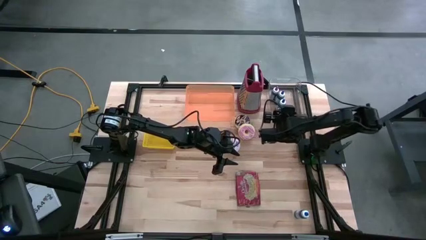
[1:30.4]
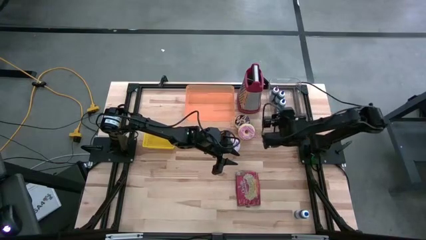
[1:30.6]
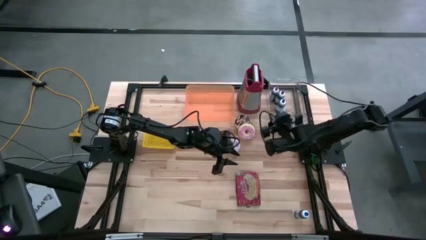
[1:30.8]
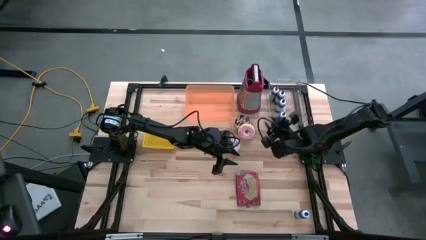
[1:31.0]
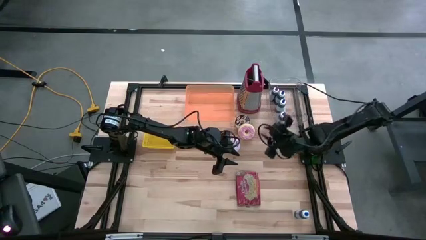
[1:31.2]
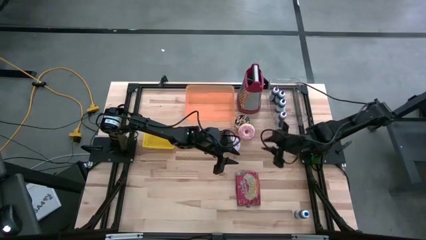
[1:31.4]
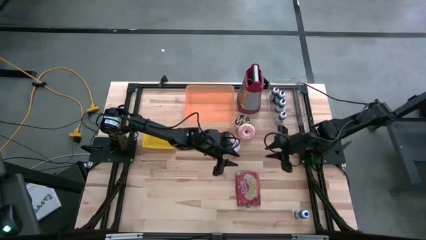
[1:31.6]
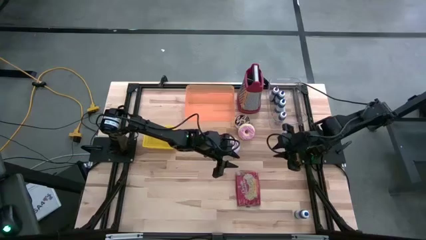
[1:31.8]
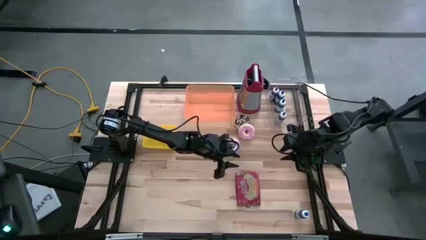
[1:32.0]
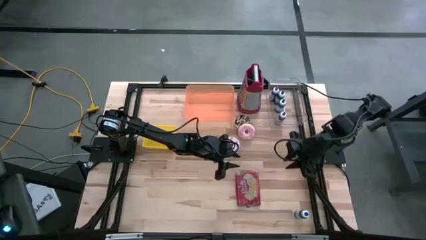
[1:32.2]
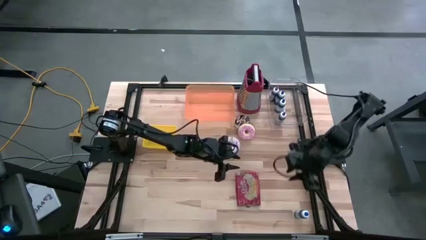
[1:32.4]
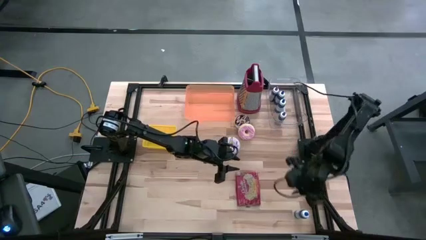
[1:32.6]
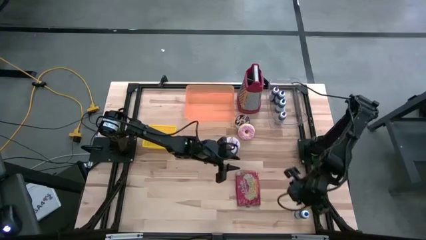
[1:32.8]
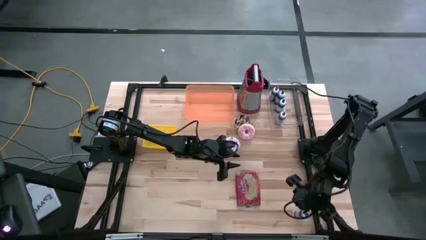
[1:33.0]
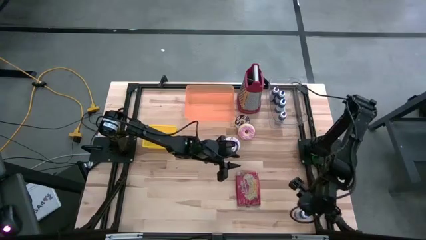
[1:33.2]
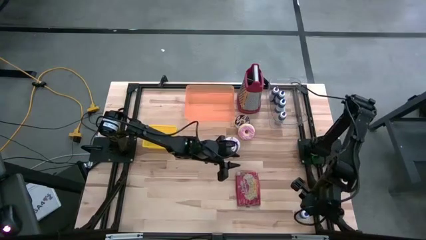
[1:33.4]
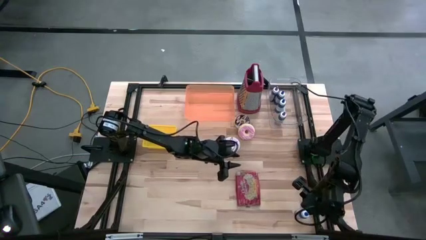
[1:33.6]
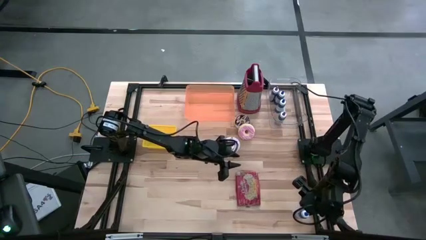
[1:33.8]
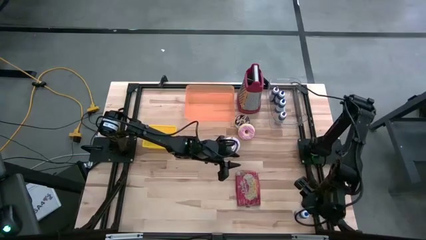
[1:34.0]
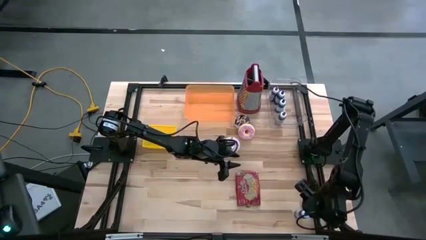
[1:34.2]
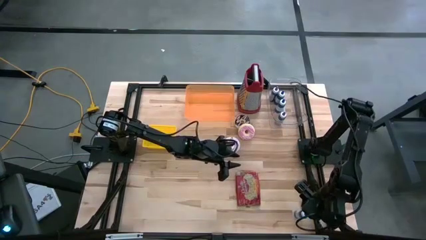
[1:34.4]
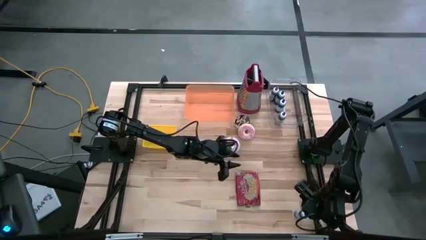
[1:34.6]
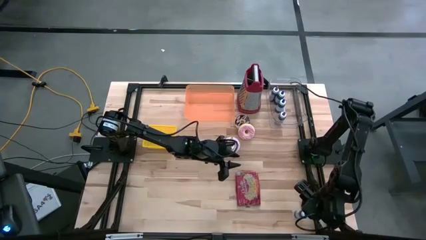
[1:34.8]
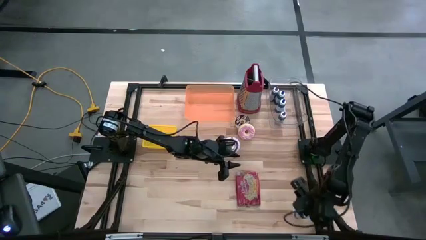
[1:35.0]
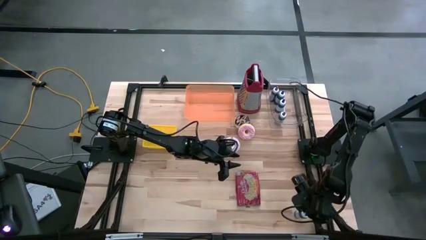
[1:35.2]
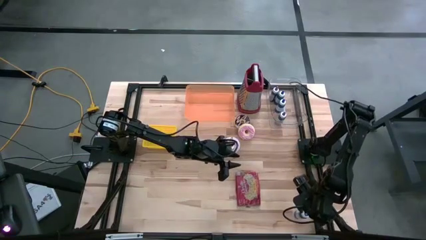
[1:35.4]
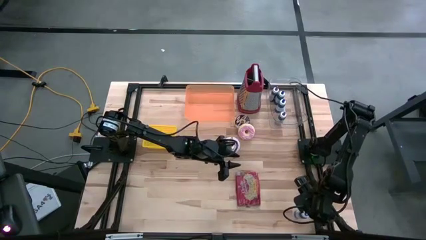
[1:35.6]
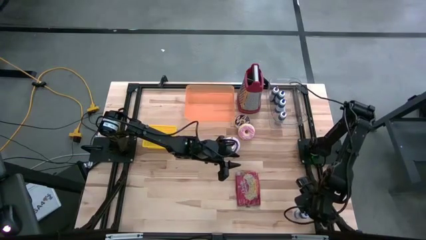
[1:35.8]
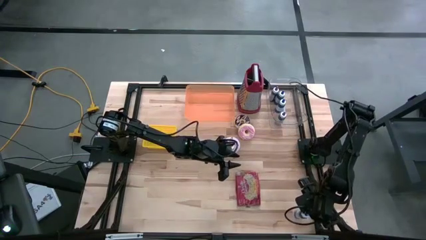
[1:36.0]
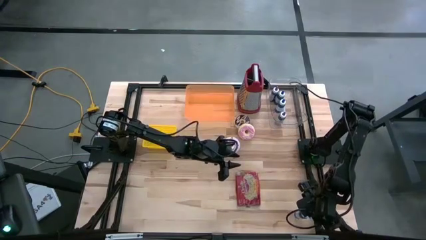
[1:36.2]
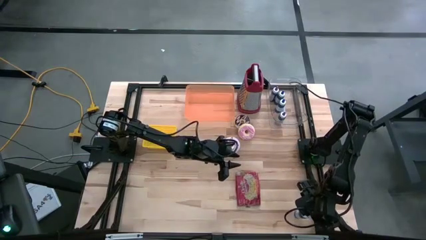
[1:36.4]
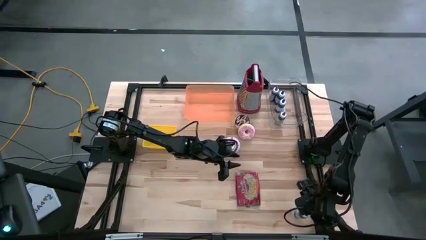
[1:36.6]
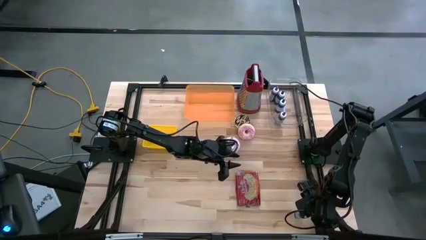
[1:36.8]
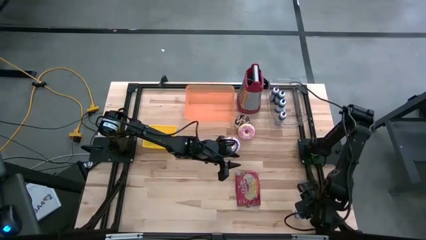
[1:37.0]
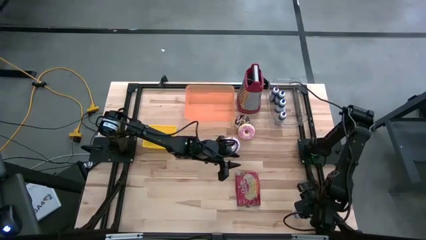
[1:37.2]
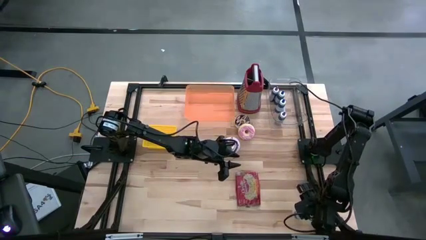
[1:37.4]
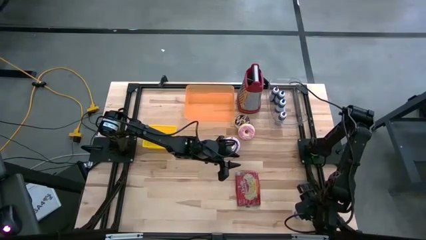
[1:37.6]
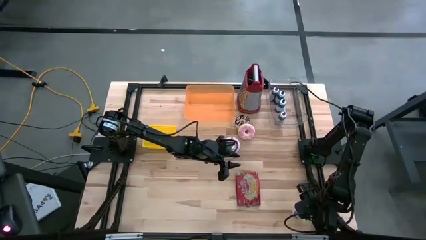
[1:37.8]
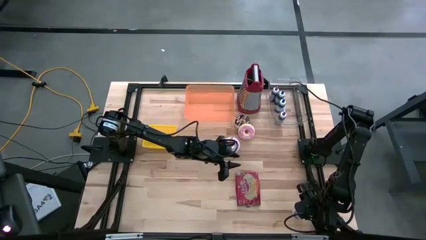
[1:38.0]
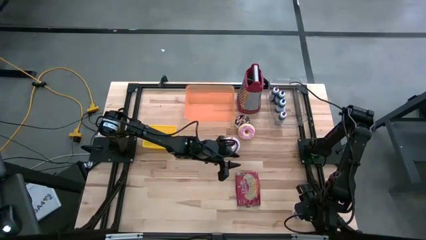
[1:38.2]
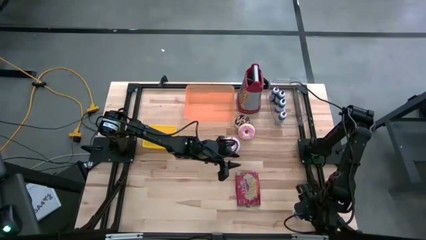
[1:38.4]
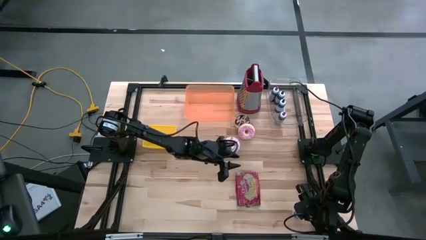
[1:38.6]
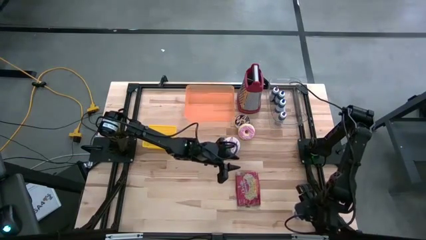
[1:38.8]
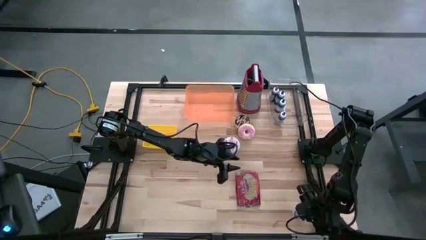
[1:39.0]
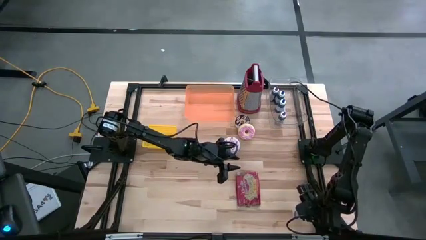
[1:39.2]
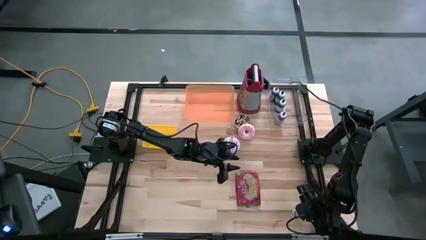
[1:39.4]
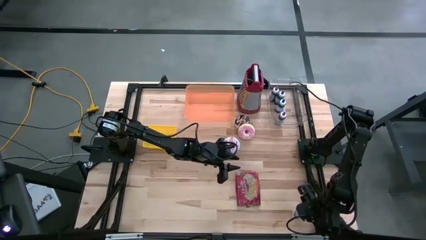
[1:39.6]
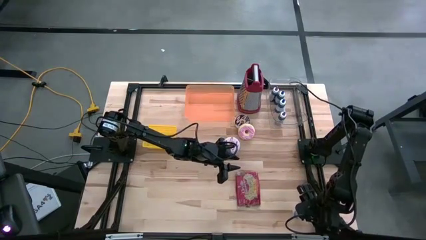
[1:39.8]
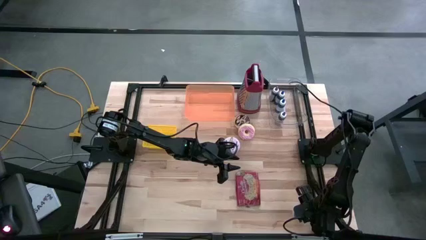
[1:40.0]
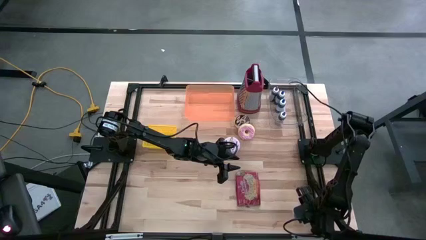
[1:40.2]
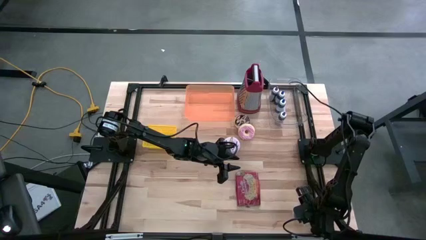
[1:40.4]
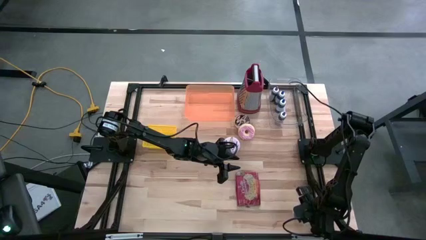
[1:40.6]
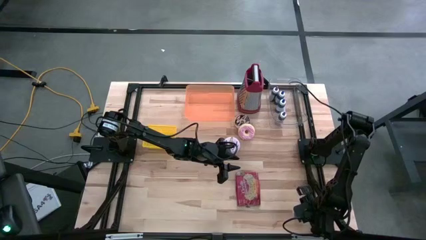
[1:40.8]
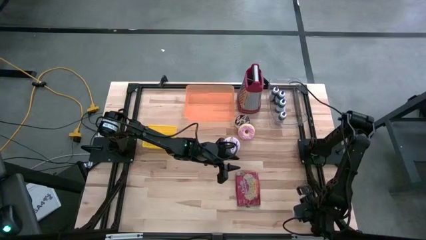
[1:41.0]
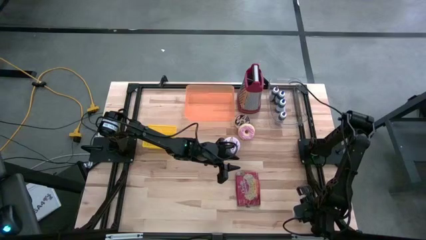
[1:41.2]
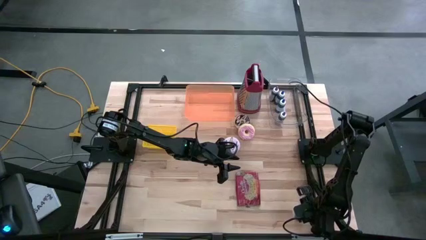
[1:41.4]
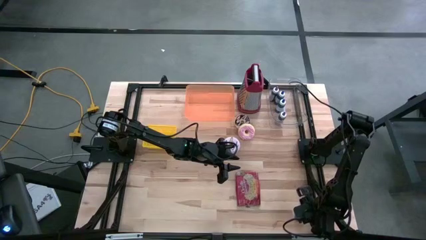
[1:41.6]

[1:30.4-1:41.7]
Task: Pick & Place Food Item
Put the blue food coloring bottle into the transparent bin

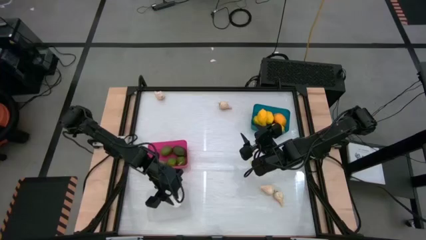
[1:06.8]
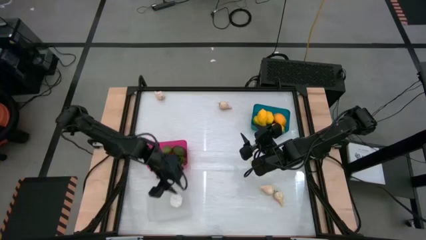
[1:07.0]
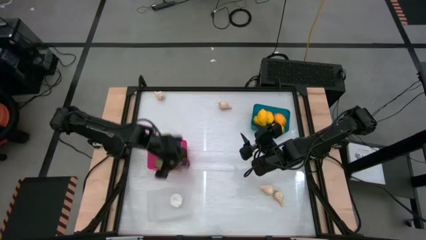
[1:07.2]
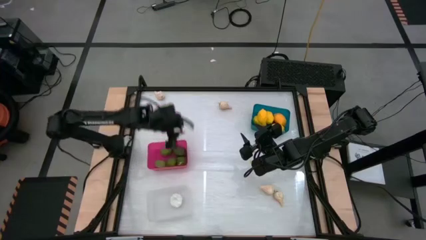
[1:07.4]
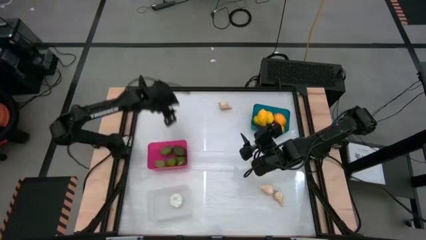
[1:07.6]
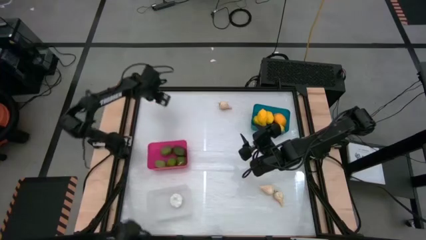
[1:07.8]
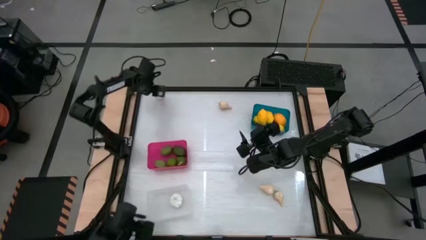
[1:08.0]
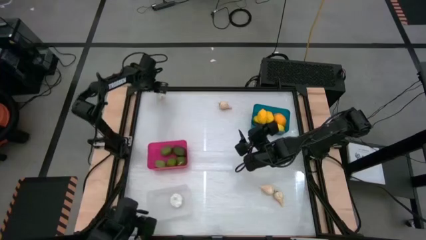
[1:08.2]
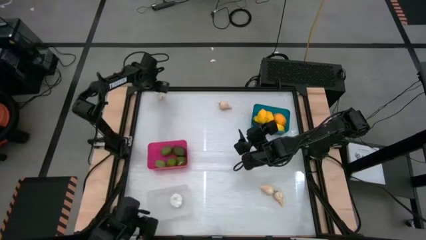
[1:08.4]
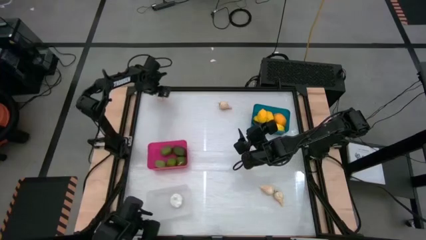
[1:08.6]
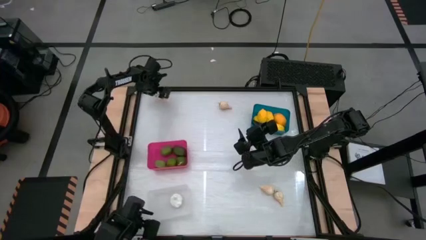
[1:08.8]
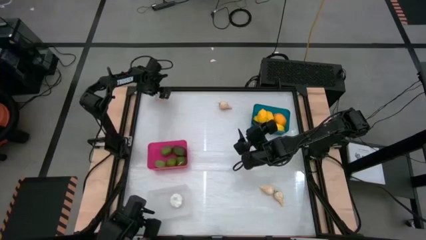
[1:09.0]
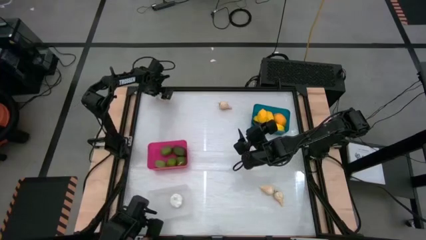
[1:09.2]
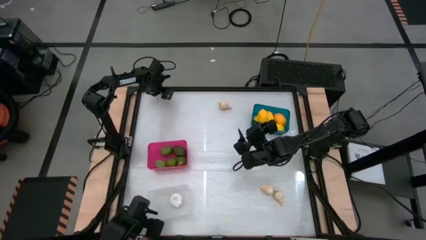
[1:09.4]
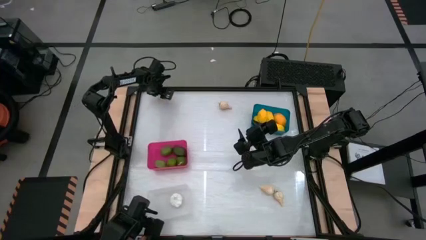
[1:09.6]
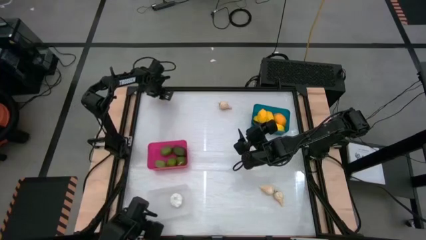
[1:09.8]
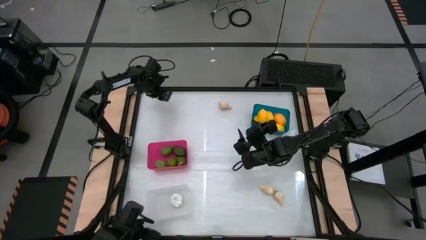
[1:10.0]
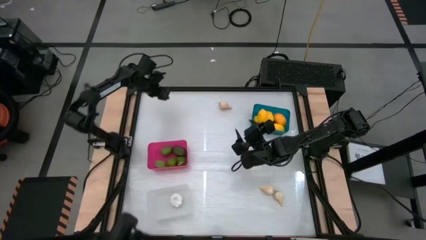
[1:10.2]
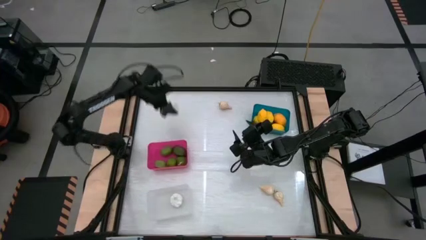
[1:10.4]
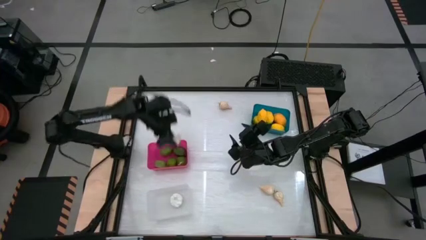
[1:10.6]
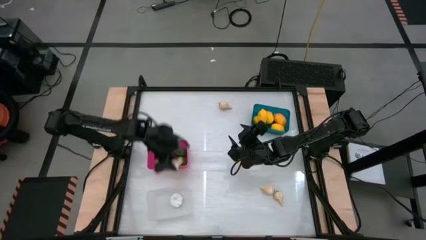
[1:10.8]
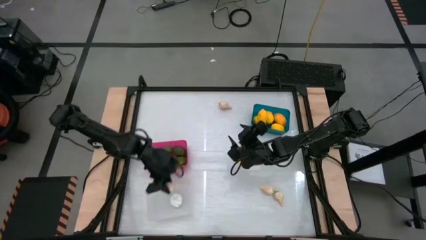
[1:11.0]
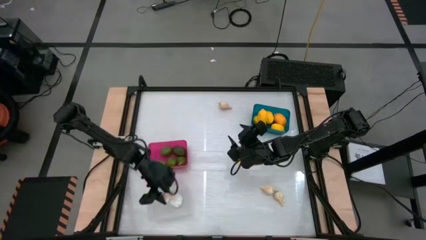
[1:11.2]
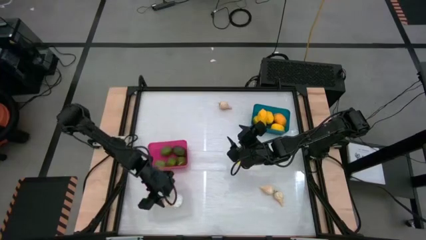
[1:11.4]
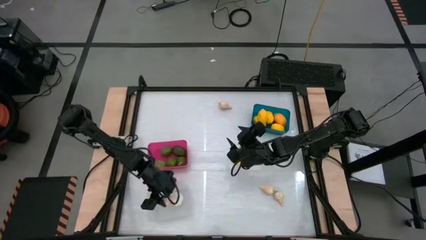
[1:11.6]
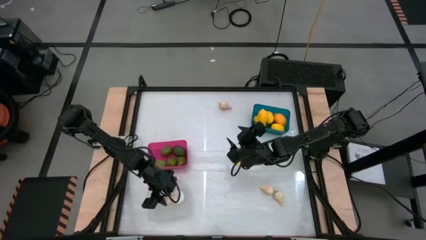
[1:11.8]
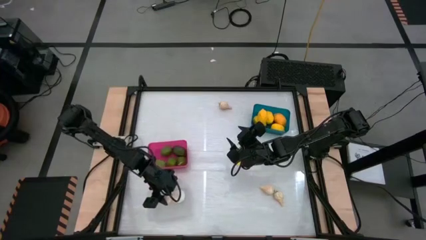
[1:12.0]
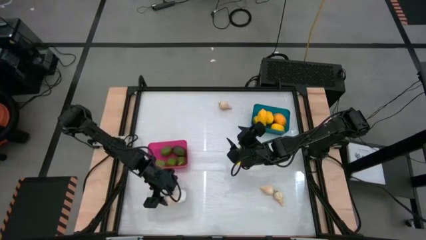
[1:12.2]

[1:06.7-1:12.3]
Task: Sort produce into baskets
Put the garlic into the white bin
